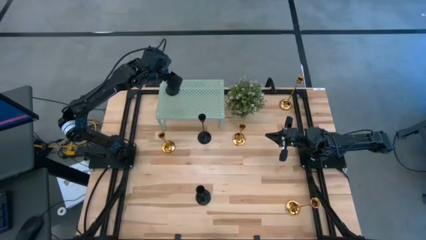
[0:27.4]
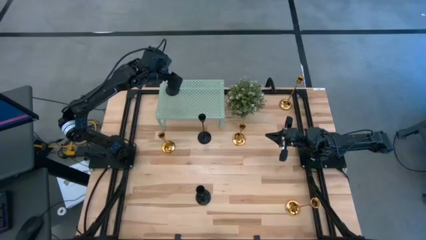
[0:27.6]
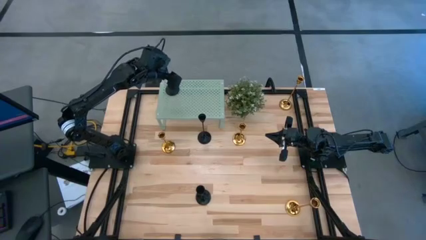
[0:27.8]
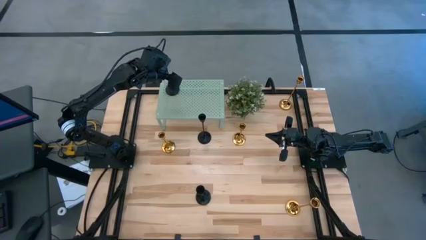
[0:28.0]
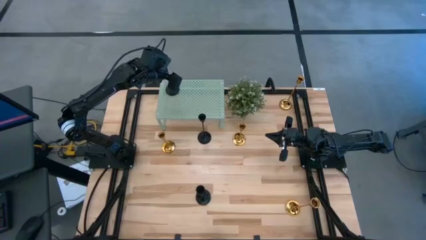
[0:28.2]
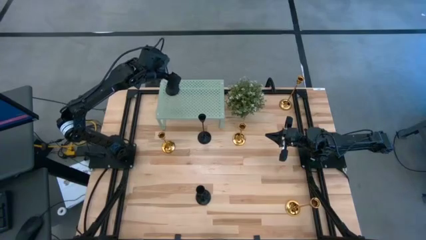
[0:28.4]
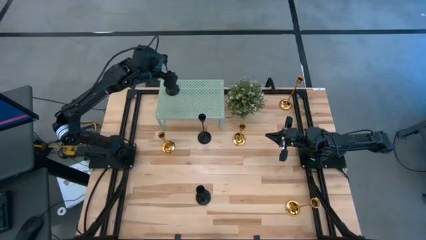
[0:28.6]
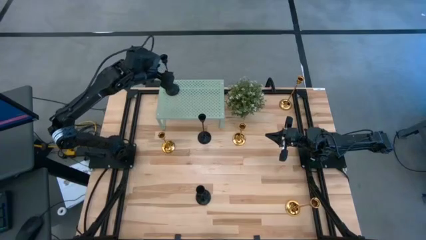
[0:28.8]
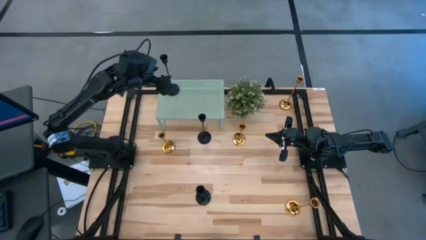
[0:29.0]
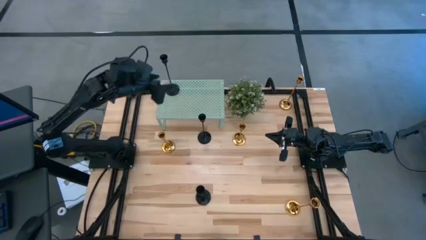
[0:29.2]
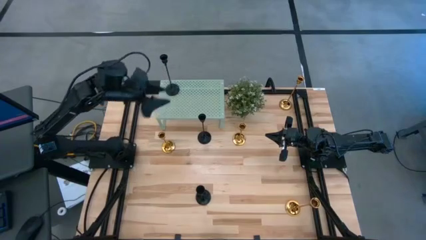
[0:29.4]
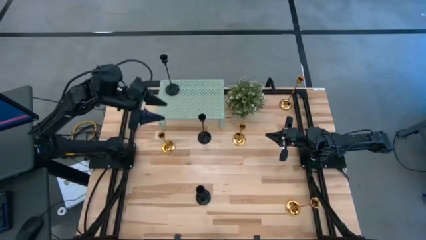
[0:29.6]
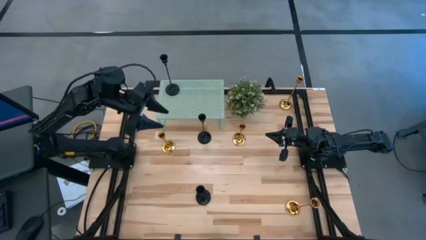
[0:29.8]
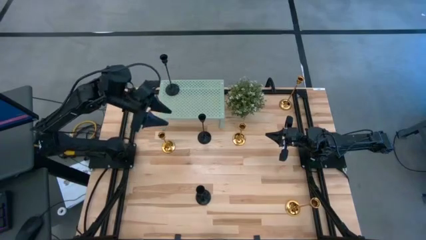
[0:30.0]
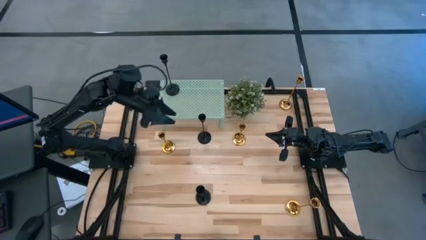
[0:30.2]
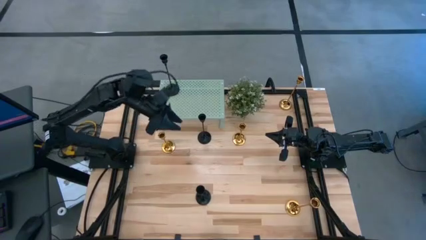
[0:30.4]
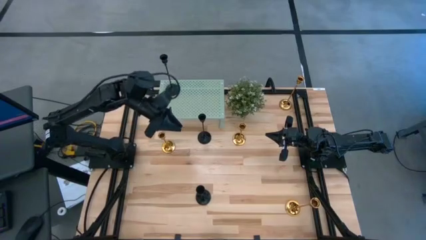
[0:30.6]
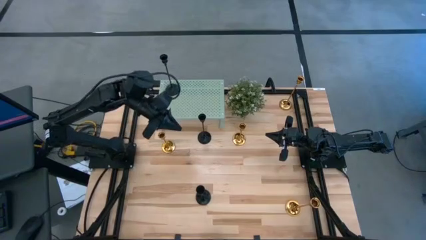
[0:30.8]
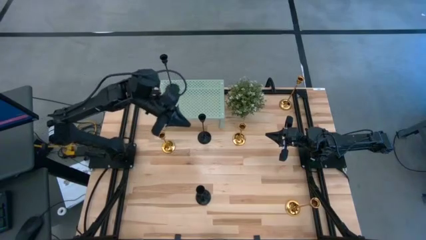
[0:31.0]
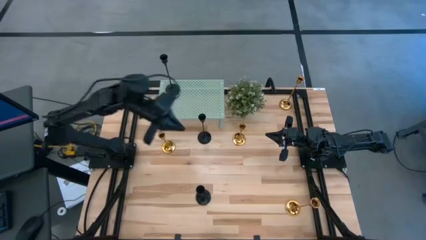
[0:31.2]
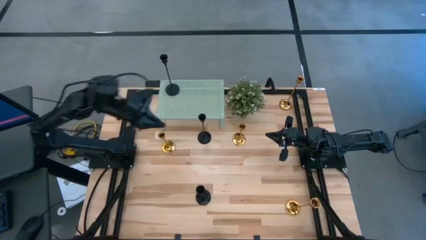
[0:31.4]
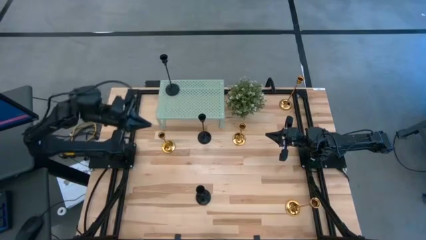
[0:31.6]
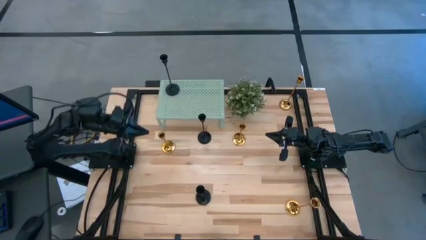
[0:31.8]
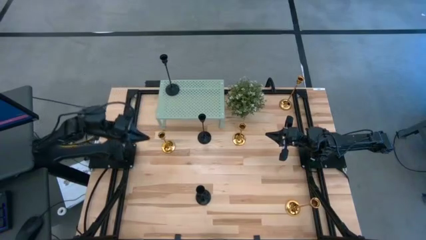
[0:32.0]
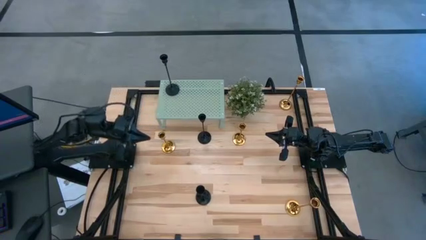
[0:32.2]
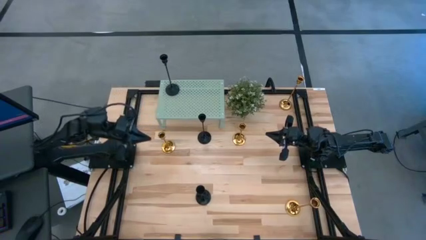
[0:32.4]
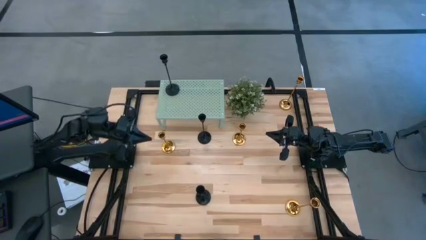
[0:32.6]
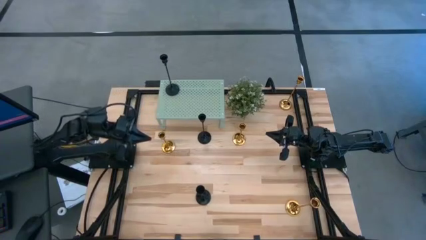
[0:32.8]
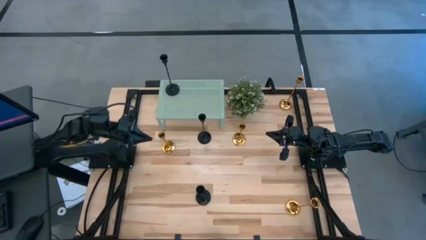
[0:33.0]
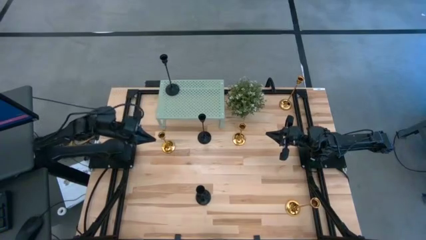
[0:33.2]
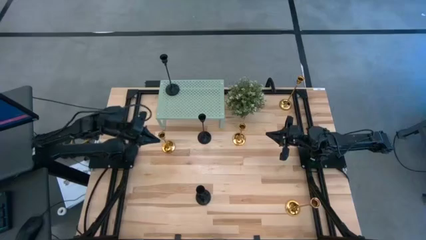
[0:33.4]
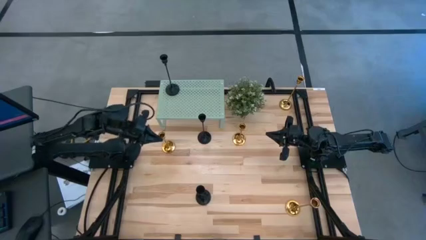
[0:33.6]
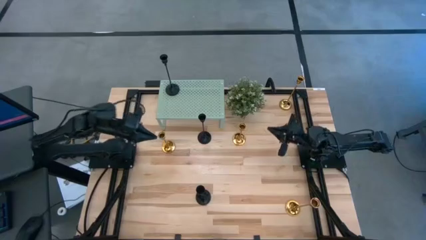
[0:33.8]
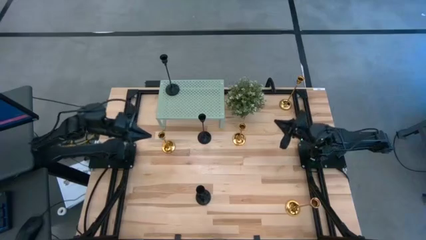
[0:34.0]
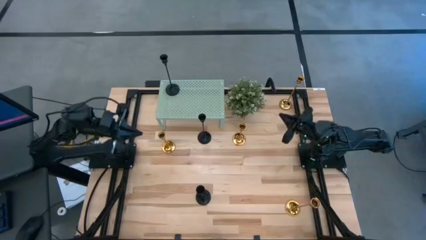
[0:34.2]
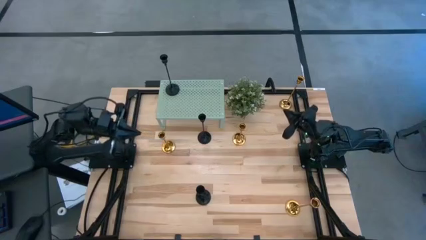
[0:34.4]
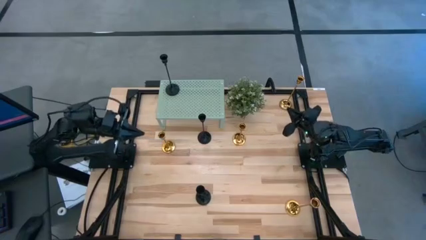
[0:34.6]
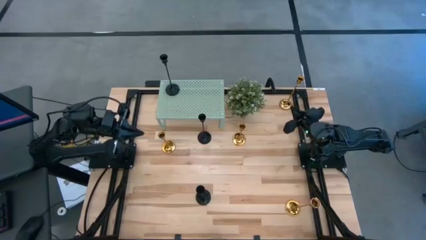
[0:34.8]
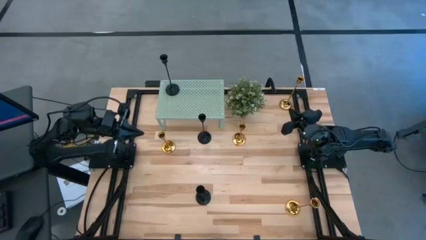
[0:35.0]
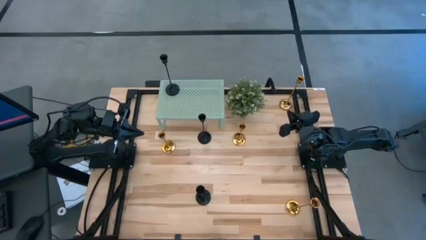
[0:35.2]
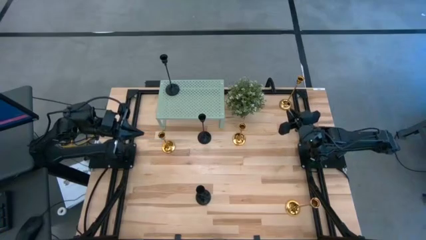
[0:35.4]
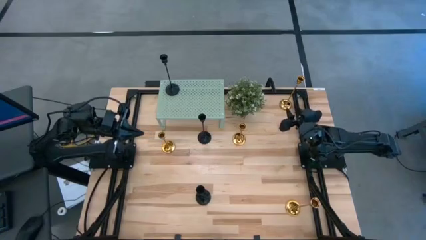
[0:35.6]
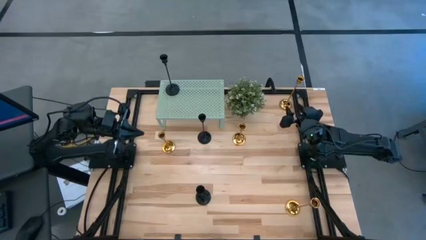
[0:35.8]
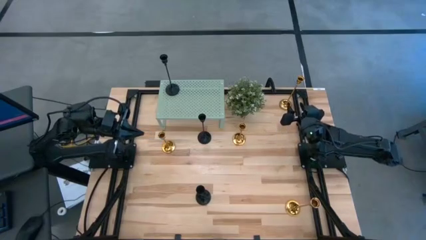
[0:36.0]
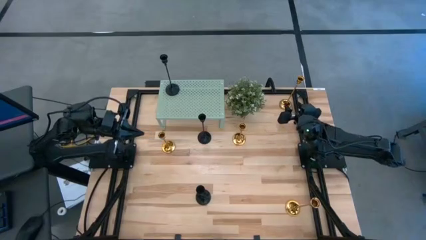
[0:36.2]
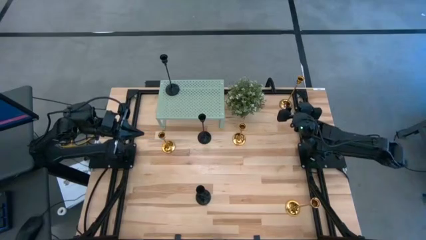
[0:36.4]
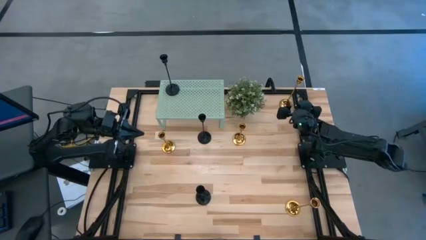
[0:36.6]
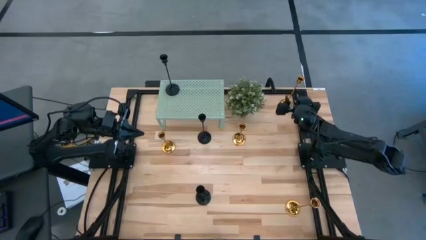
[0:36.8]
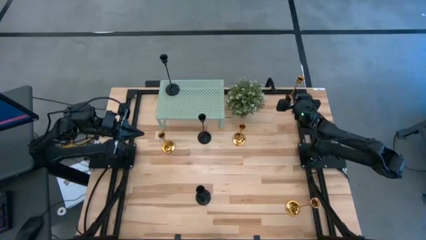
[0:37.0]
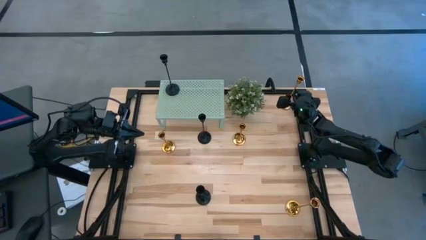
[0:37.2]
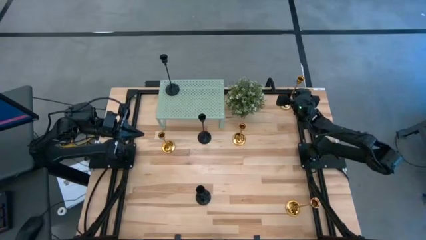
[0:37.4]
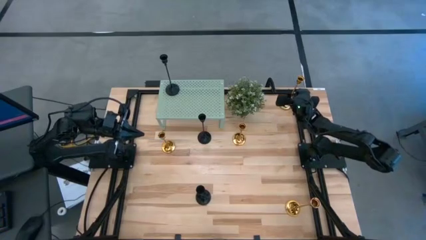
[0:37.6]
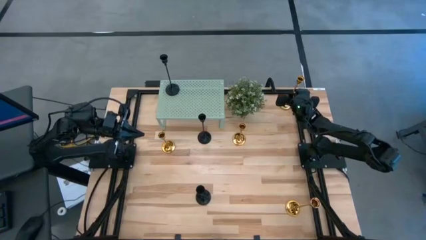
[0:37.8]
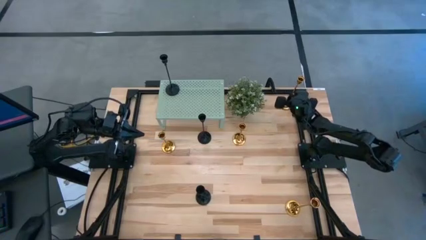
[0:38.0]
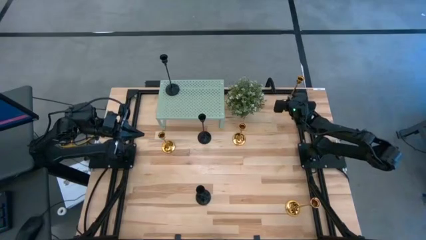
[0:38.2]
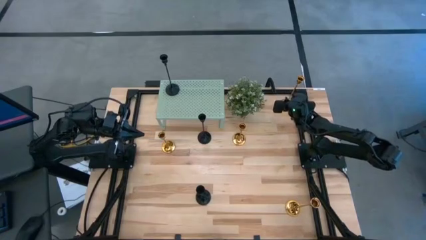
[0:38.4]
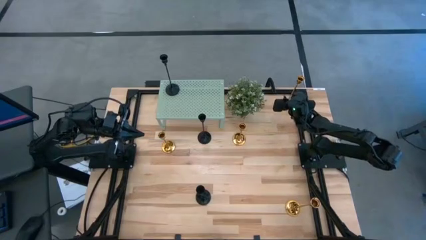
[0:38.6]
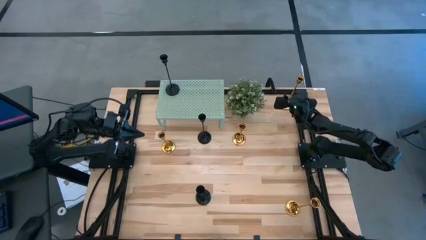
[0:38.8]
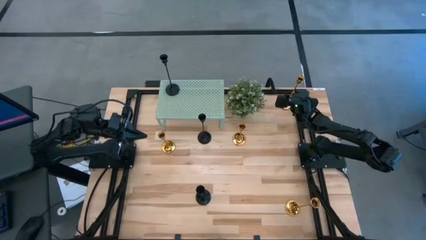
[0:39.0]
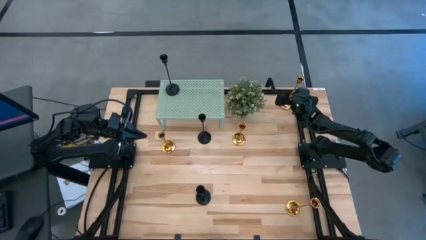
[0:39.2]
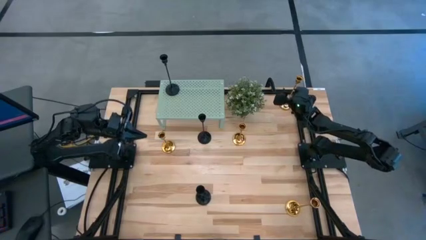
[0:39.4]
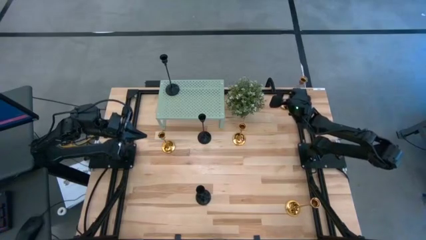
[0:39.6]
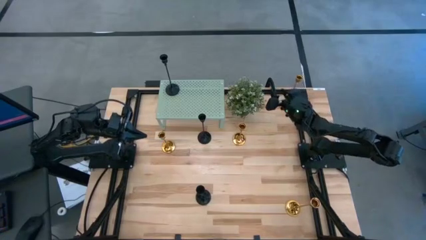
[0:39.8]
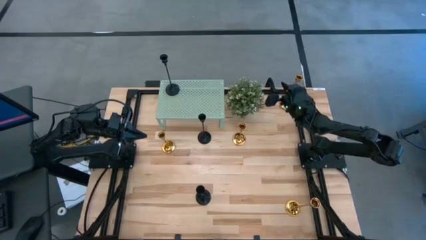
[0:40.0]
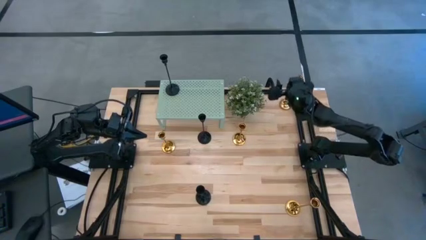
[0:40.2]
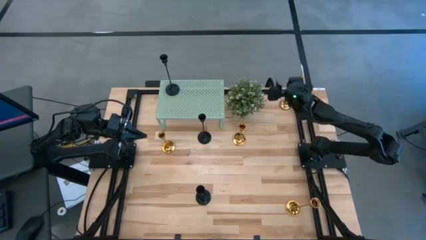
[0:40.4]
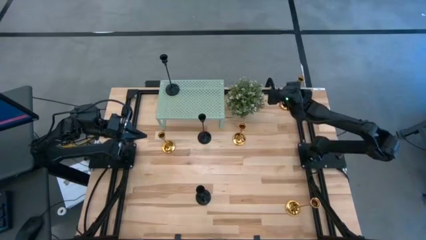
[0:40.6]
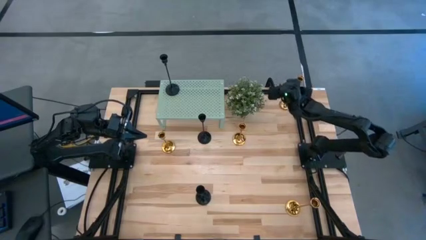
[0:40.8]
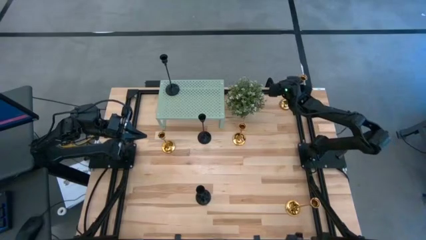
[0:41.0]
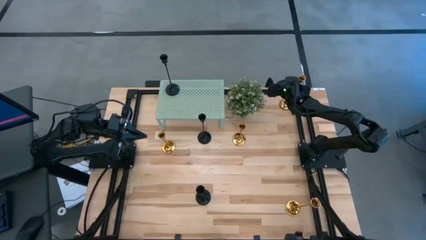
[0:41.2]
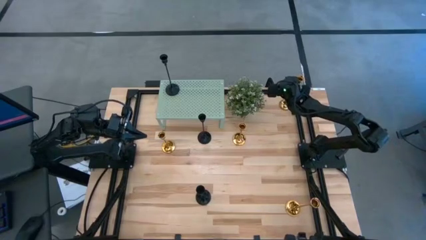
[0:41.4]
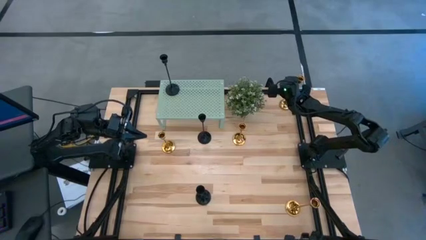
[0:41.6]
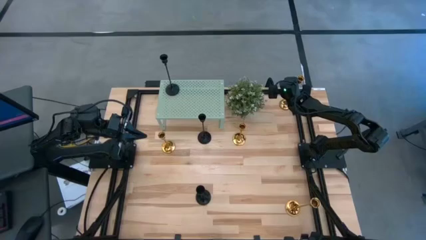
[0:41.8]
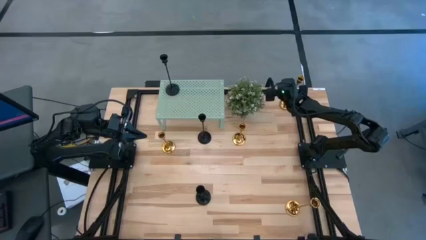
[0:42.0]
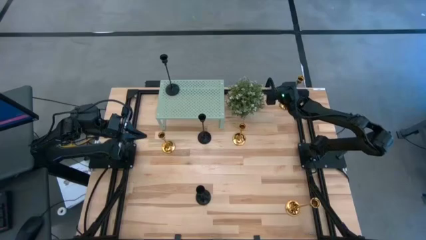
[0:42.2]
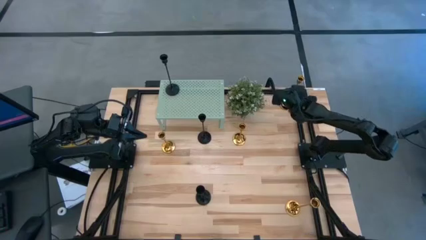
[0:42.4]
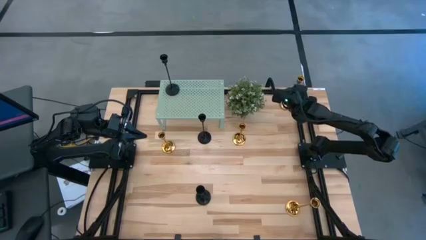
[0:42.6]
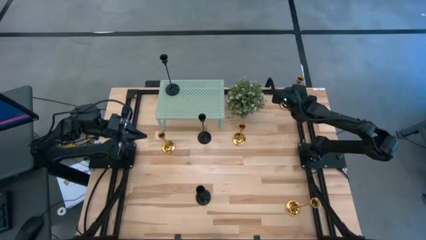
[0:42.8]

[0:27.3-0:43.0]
Task: Pick & Place candle stick holders
Put the gold candle holder on the shelf aligned with the black candle holder

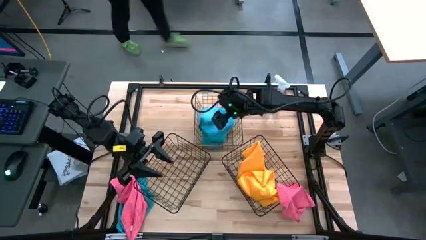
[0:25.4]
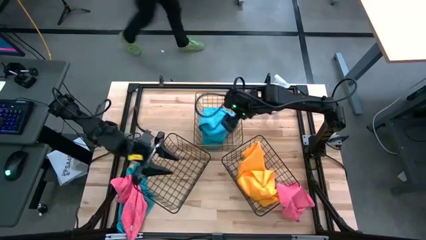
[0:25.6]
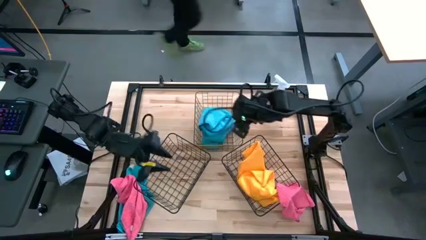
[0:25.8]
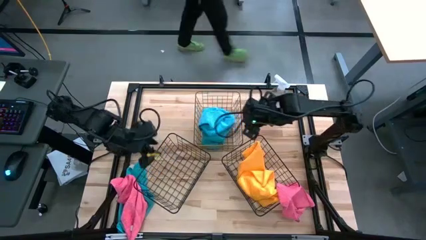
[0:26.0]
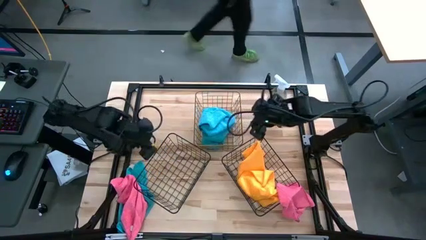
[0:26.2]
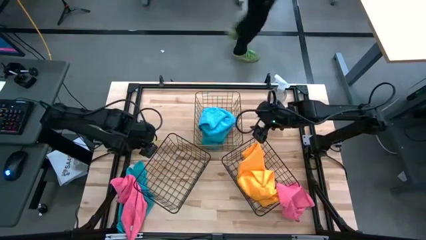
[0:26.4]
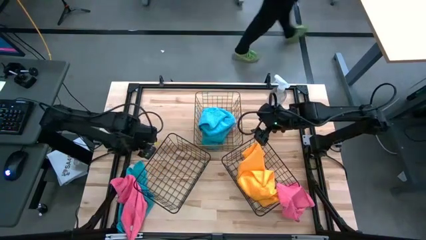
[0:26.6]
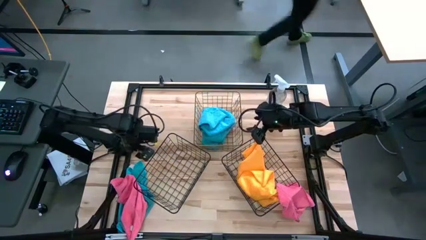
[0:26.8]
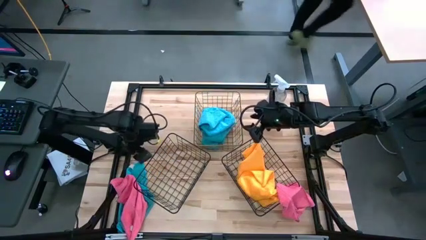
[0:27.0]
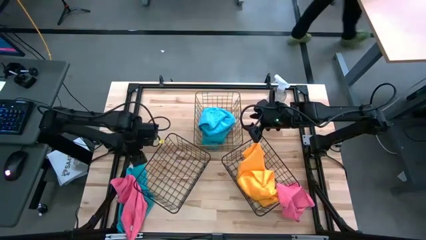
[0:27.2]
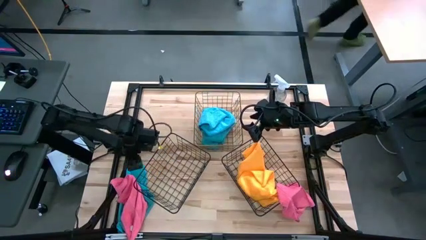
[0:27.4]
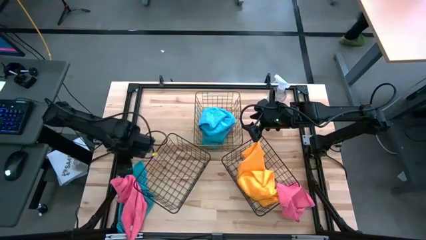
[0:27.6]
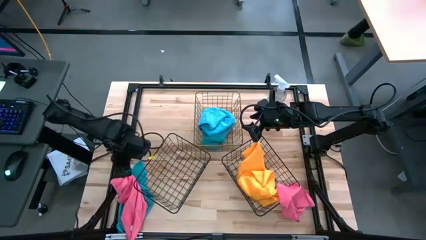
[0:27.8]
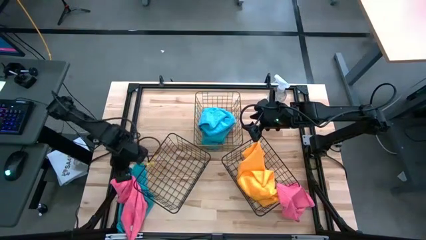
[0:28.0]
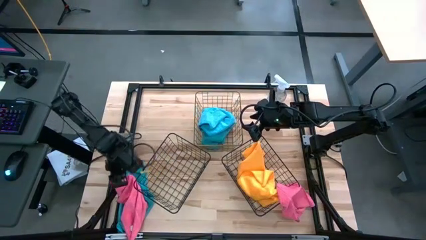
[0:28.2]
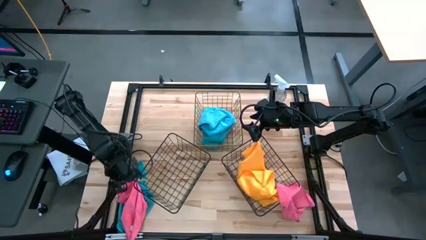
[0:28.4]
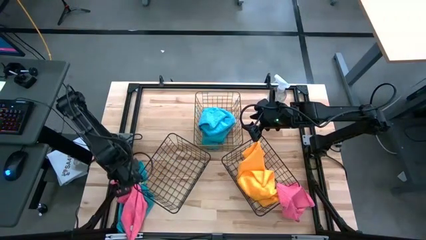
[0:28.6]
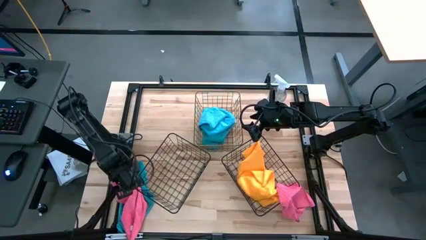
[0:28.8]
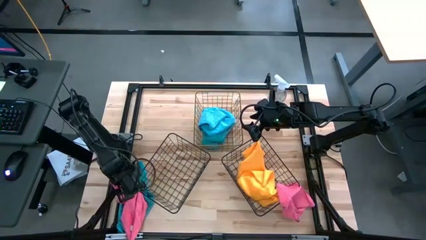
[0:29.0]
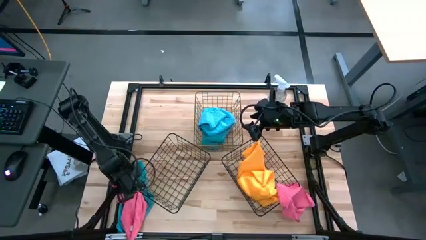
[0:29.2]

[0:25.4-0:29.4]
Task: Sort microfiber towel by color & place in baskets
Put the left pink microfiber cloth into the bottom left wire basket
